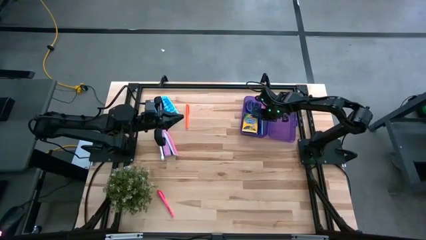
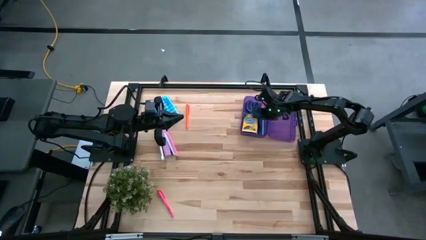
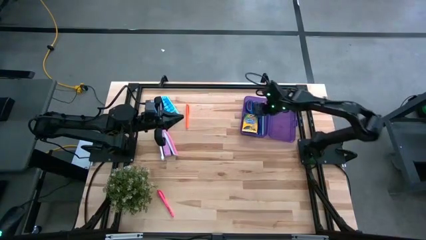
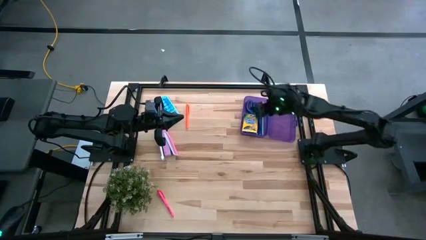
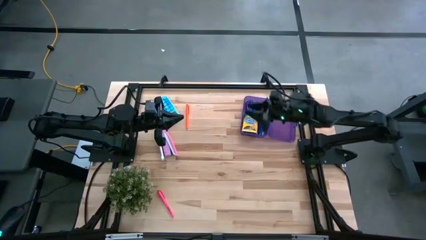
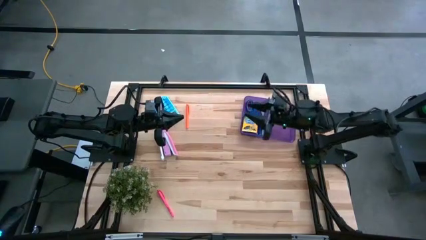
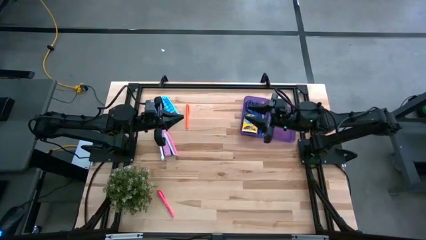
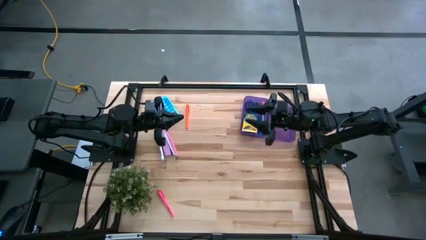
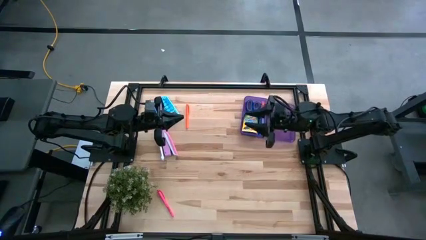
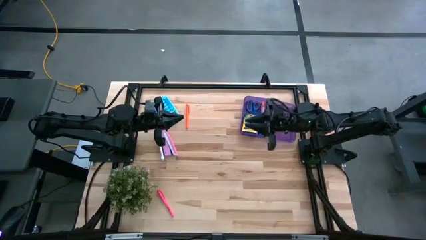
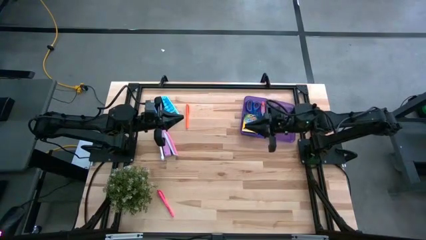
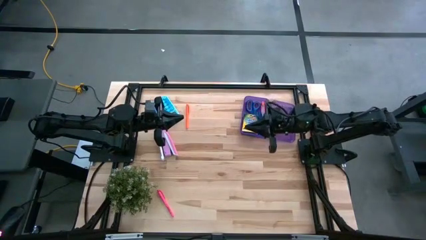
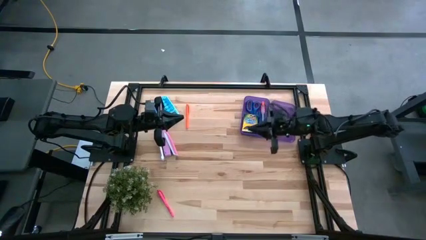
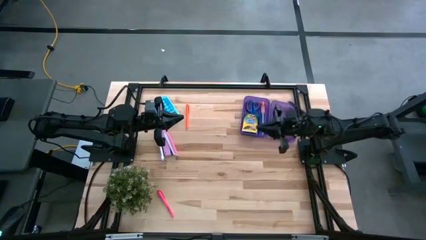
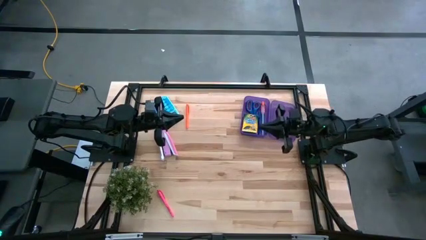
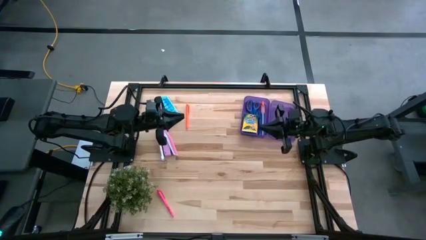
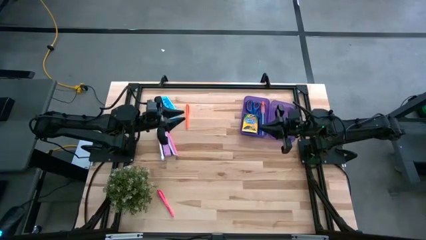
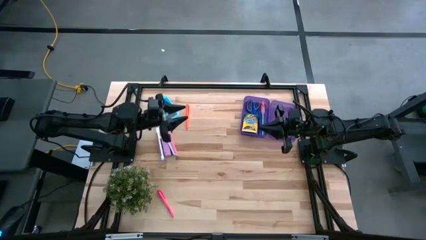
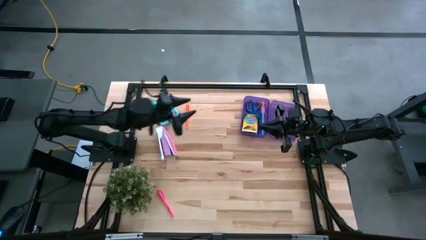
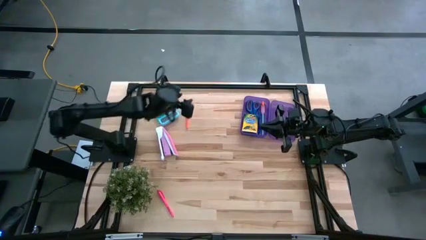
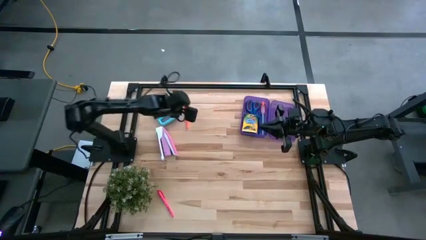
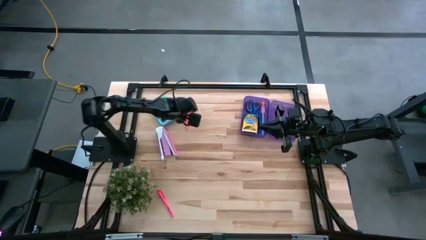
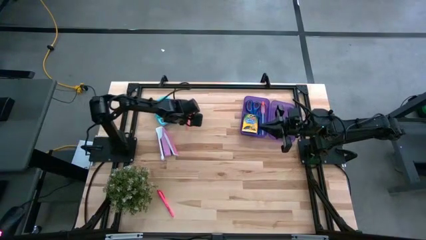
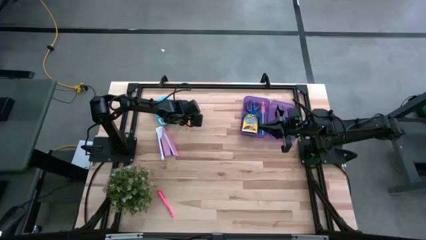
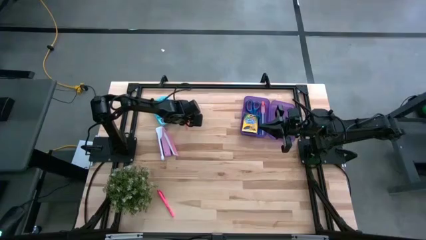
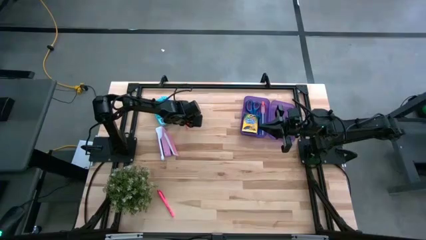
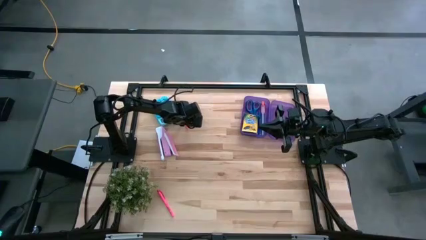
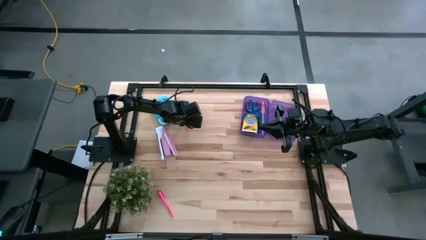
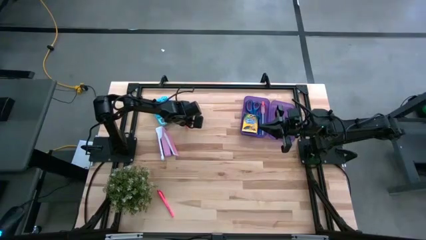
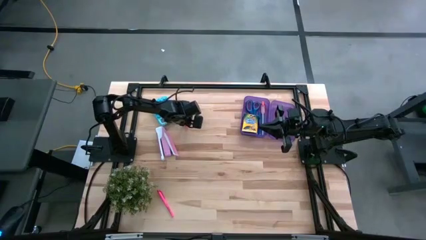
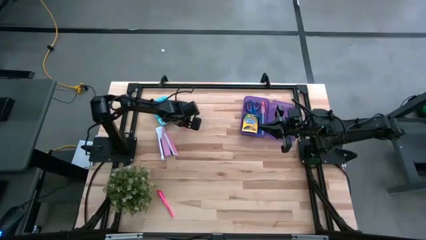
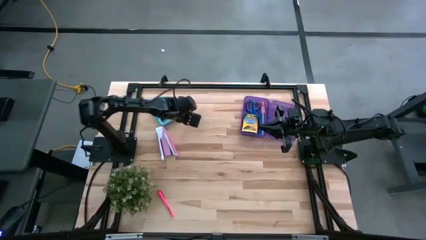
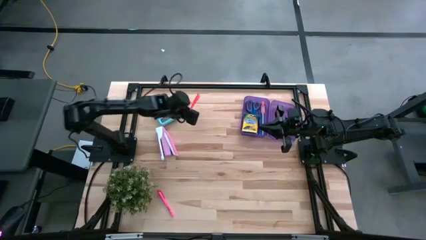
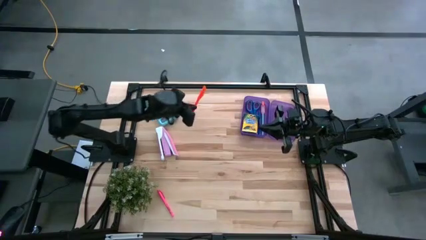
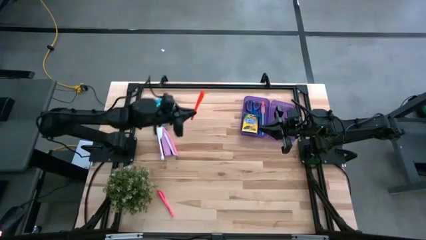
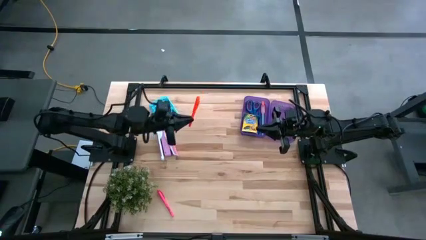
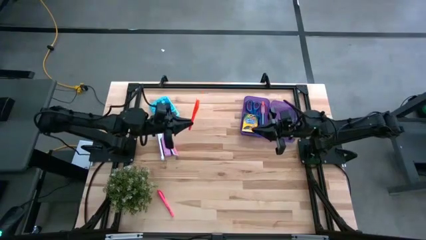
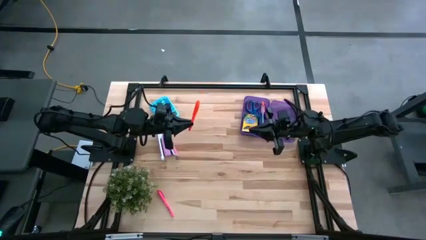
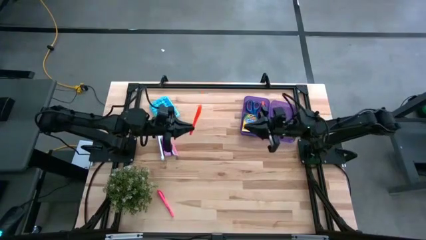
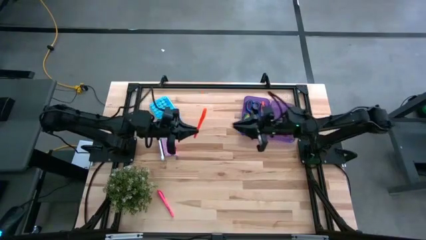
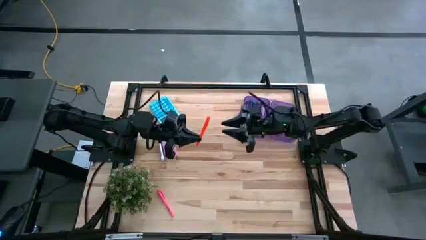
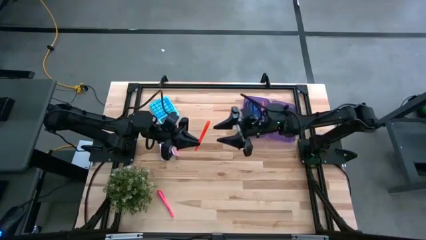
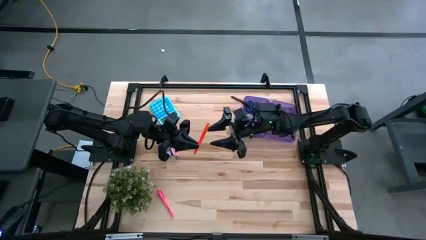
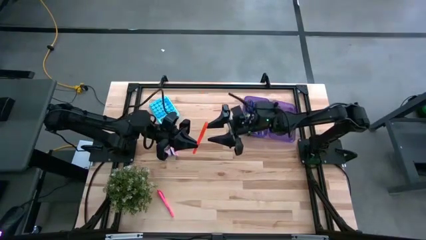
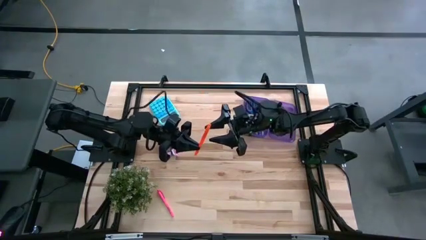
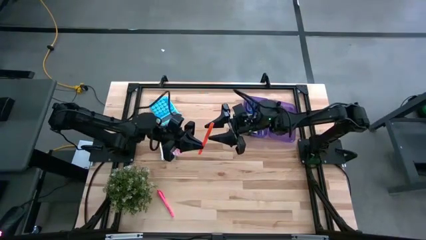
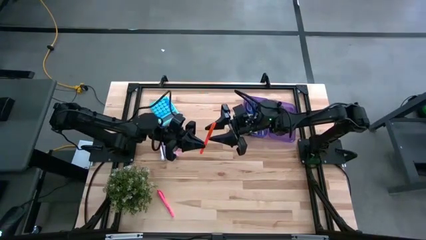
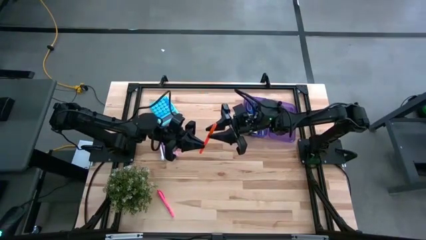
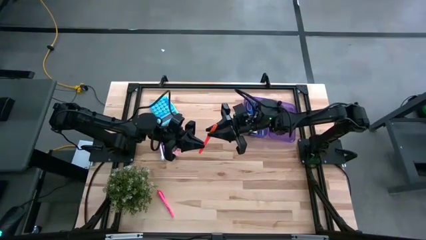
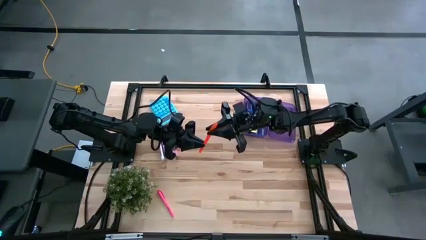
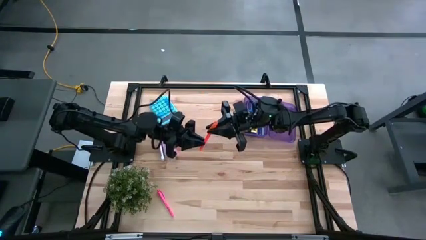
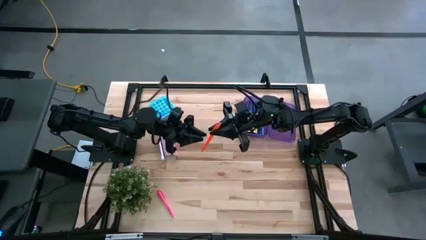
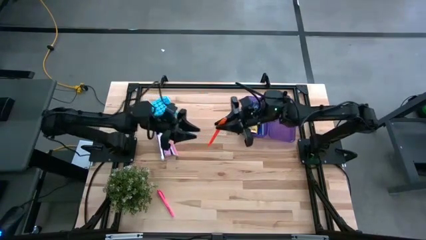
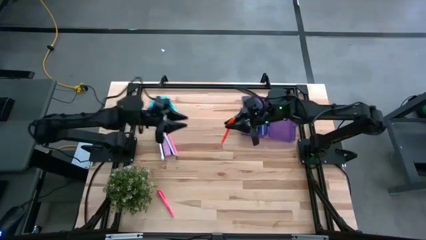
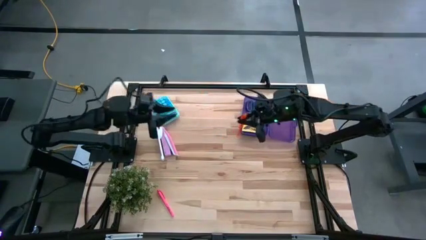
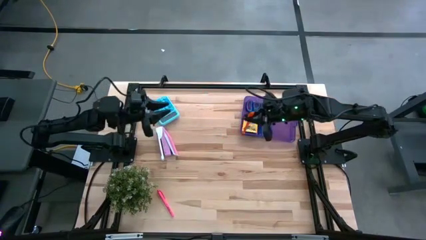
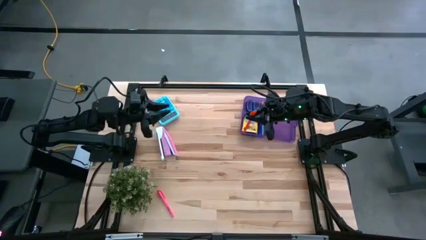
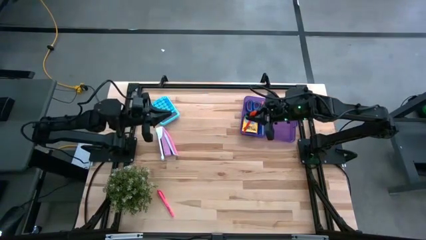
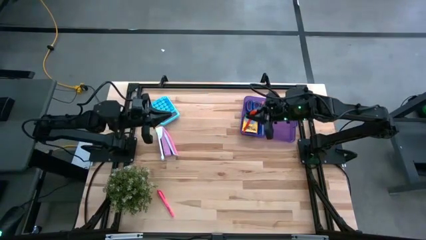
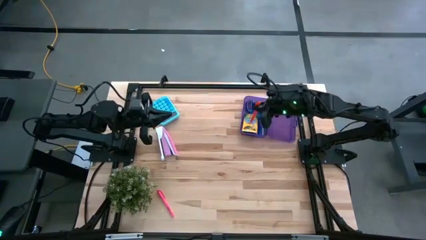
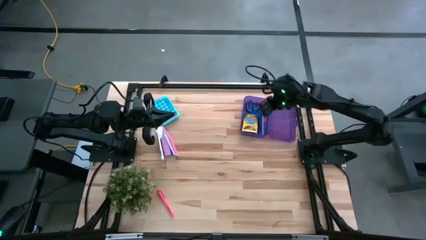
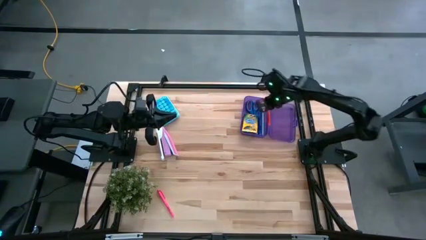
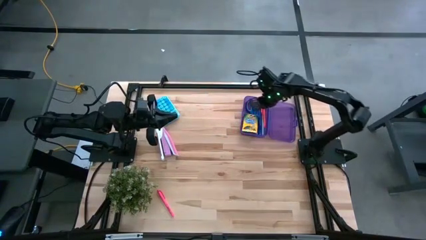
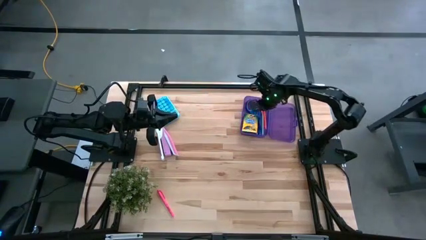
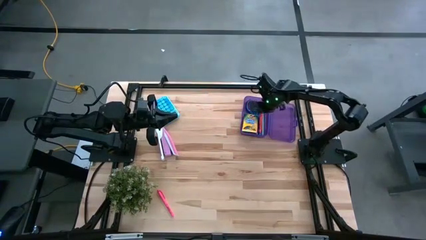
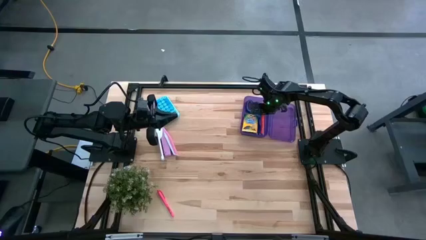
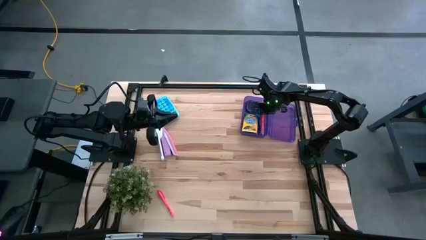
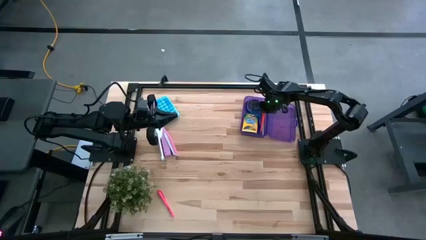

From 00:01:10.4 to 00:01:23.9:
Task: Pack school essentials
Put the orange pen into the violet supply box

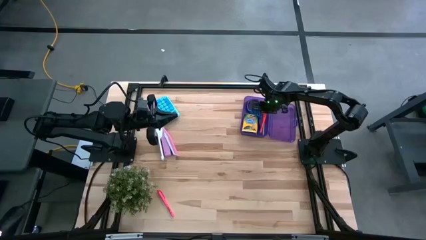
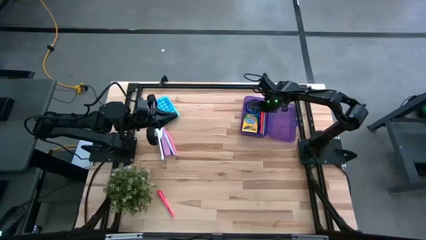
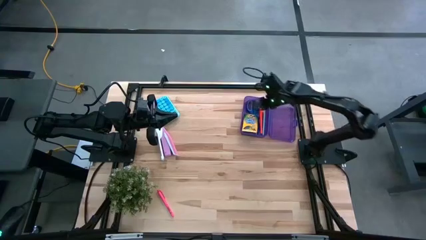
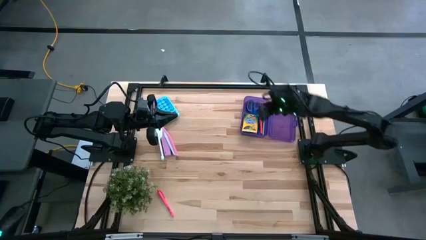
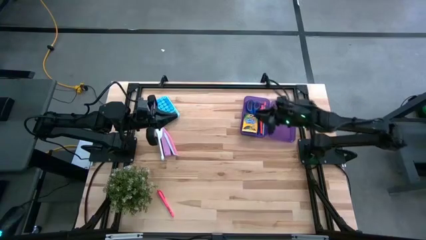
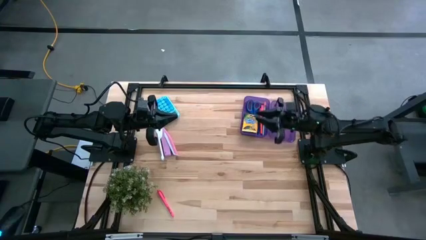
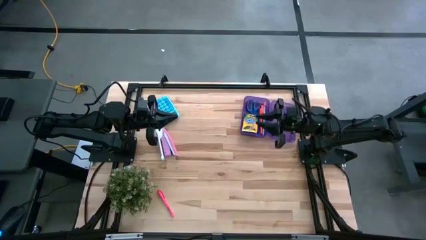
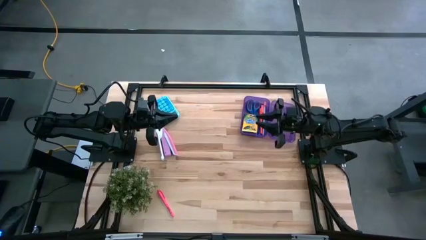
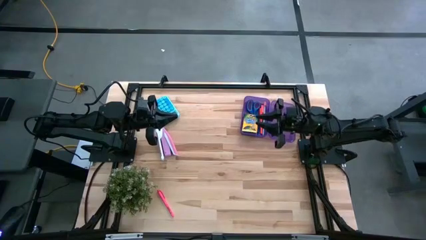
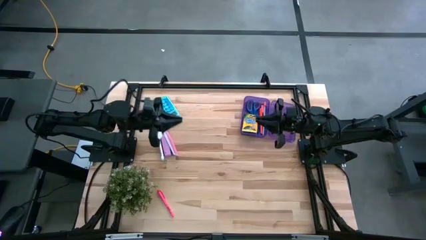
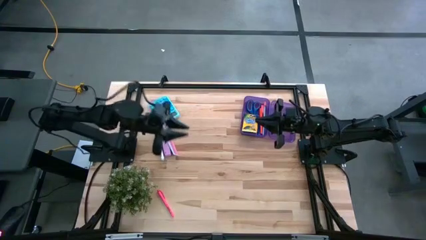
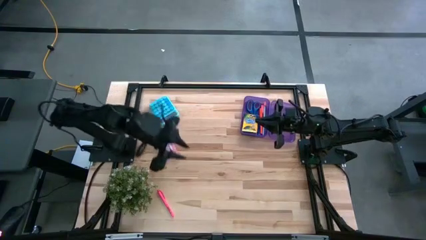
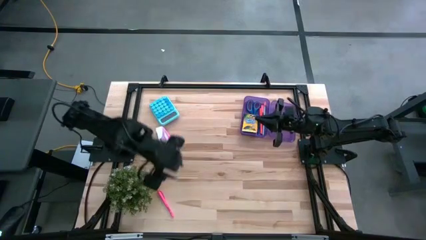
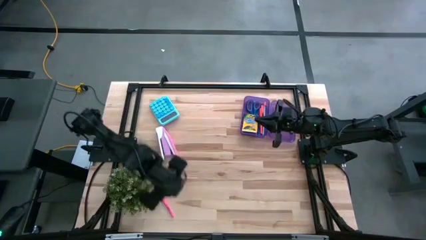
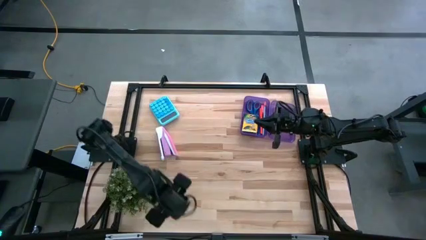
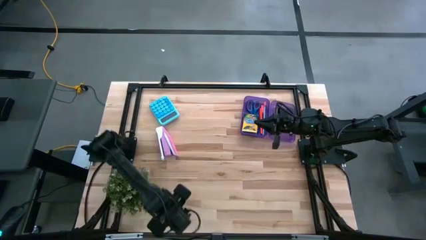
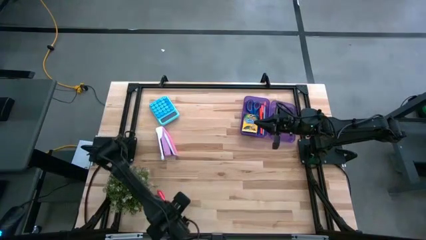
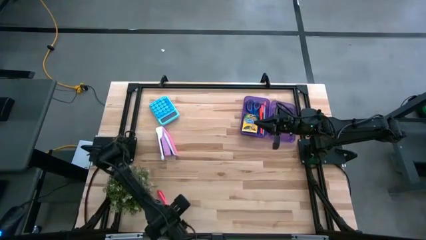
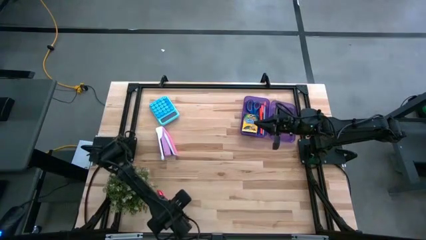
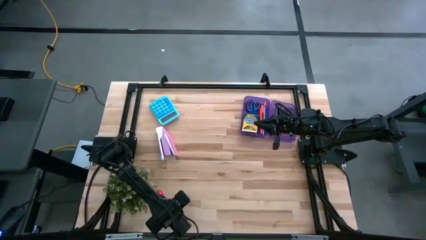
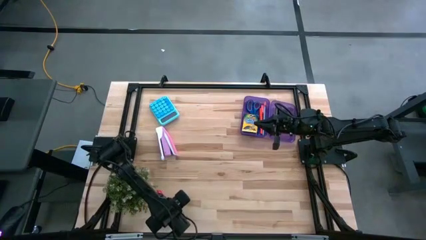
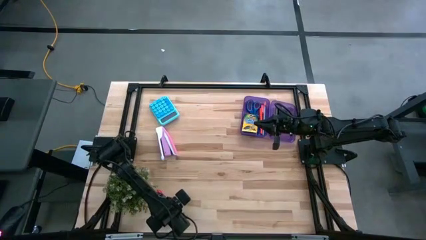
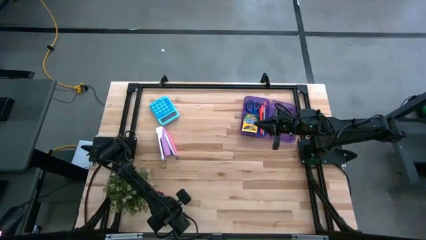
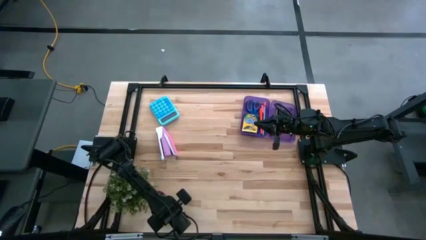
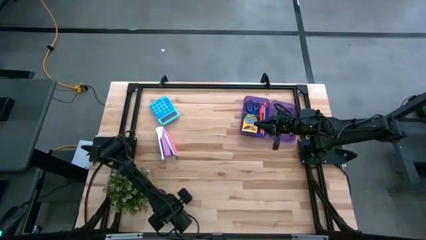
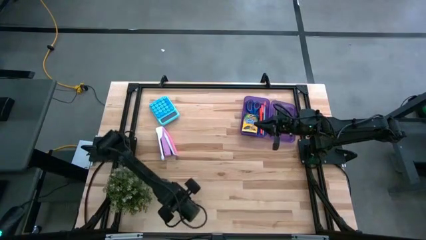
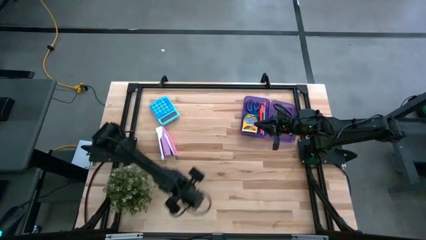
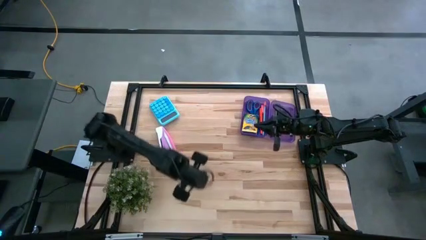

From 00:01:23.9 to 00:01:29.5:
Put the pink pen into the violet supply box
